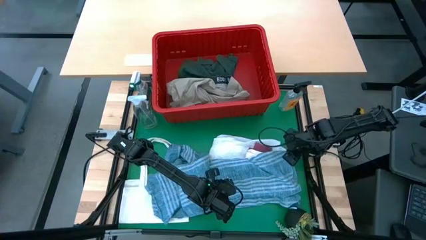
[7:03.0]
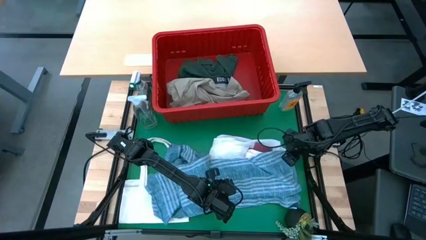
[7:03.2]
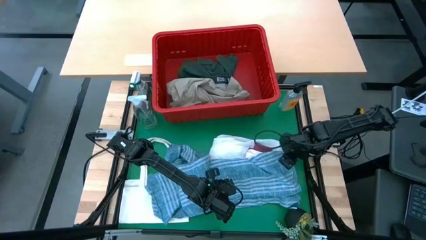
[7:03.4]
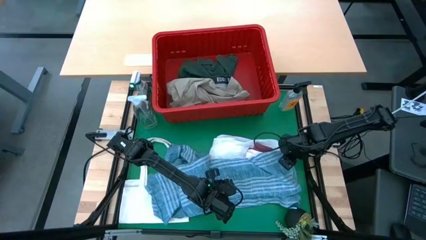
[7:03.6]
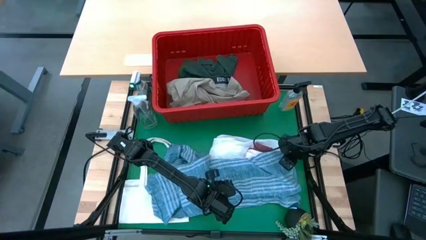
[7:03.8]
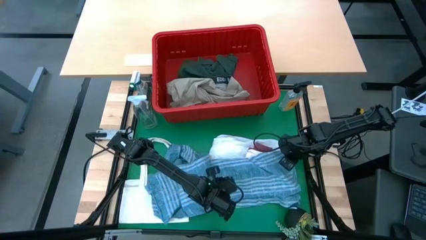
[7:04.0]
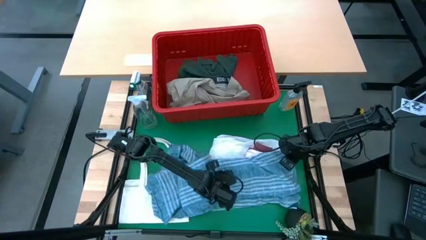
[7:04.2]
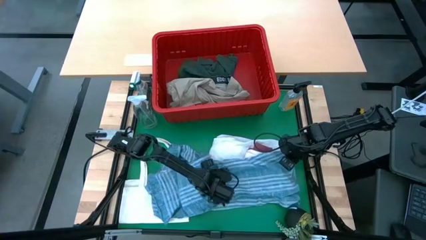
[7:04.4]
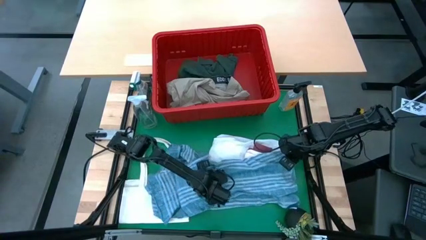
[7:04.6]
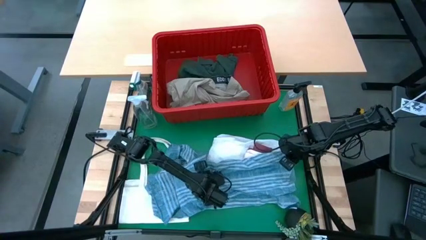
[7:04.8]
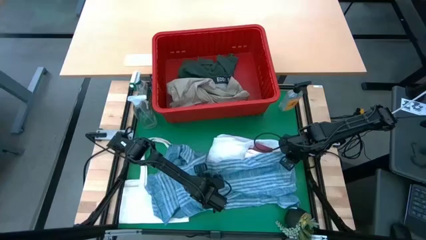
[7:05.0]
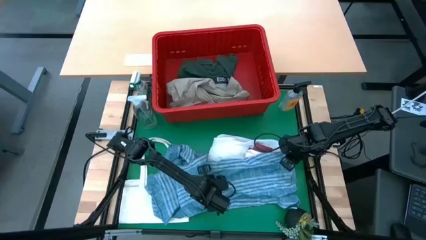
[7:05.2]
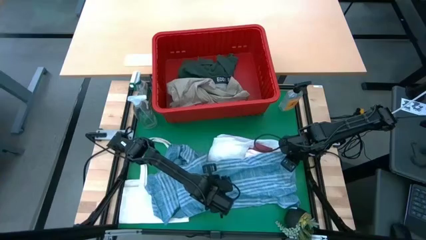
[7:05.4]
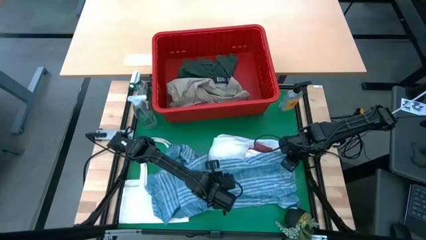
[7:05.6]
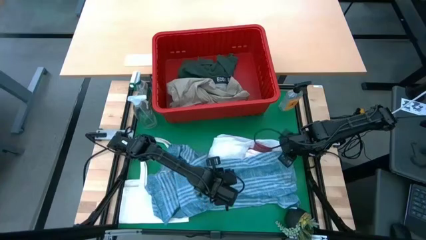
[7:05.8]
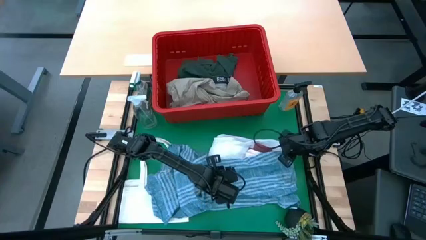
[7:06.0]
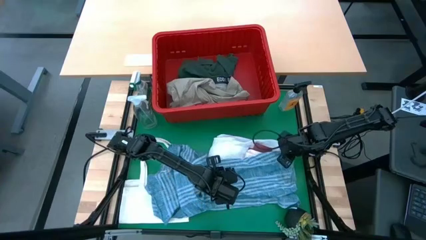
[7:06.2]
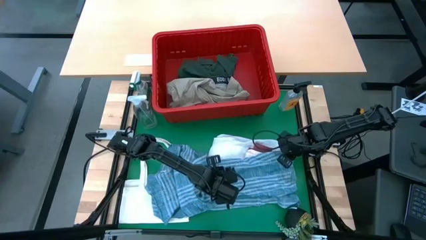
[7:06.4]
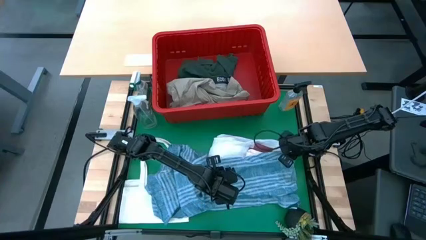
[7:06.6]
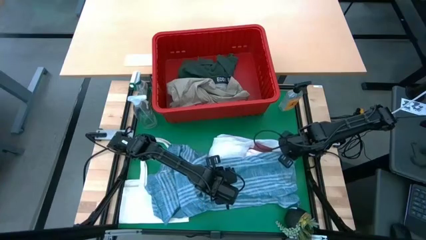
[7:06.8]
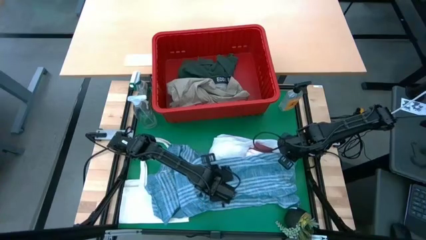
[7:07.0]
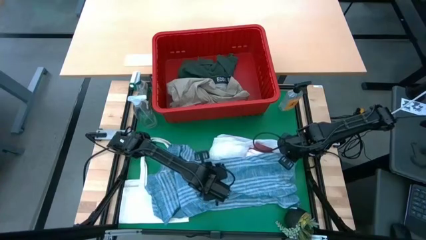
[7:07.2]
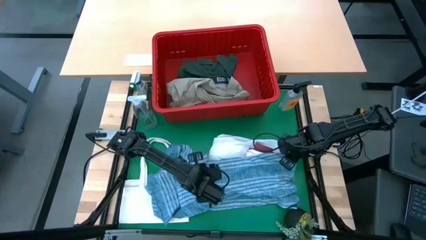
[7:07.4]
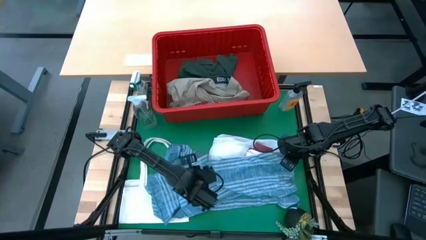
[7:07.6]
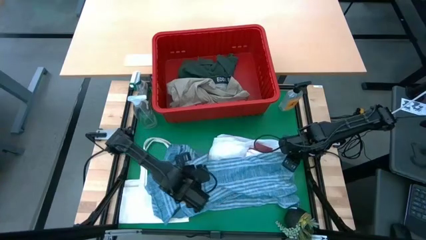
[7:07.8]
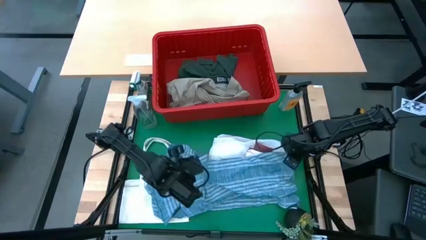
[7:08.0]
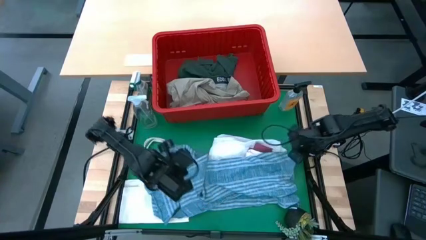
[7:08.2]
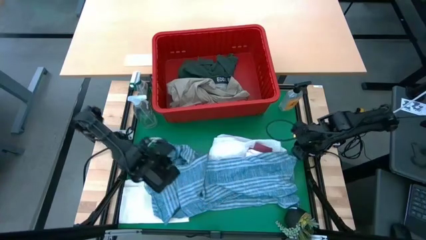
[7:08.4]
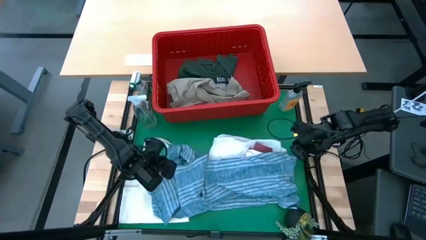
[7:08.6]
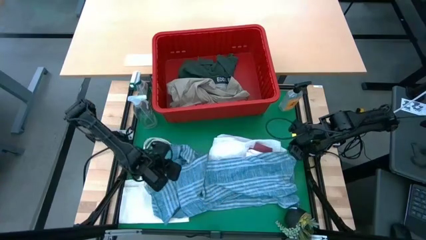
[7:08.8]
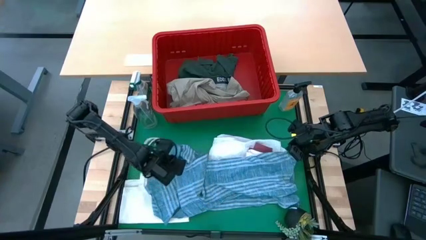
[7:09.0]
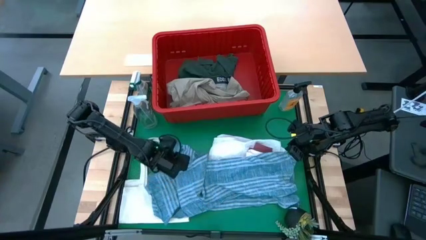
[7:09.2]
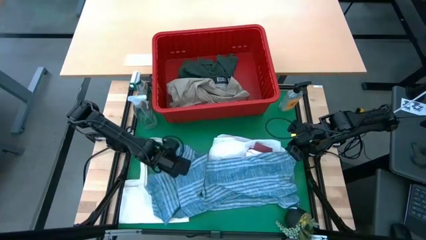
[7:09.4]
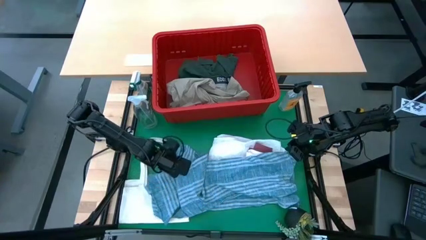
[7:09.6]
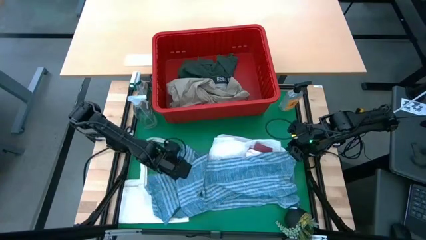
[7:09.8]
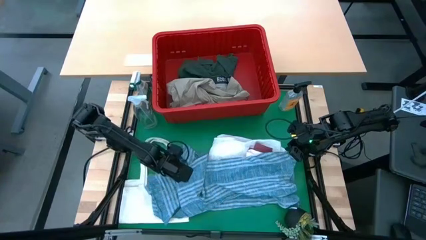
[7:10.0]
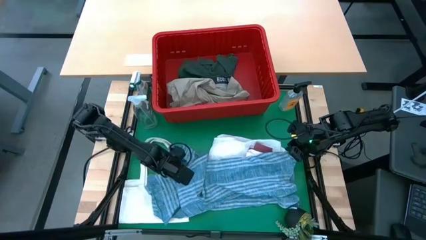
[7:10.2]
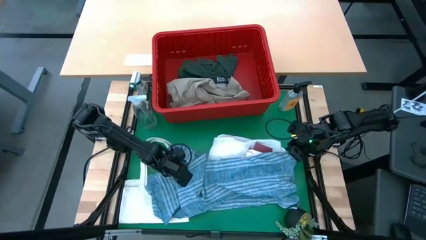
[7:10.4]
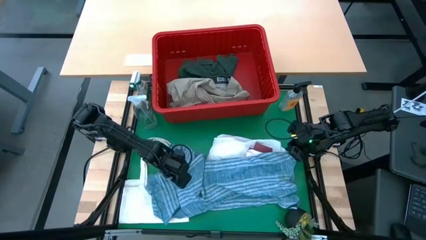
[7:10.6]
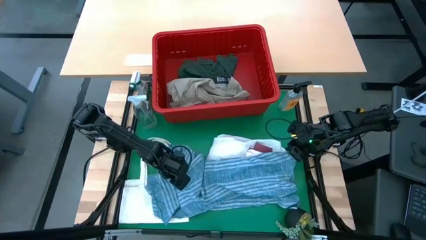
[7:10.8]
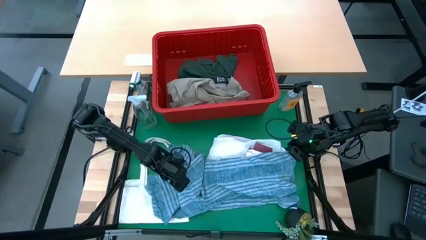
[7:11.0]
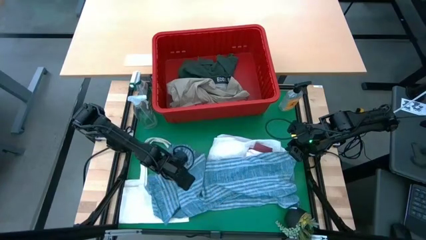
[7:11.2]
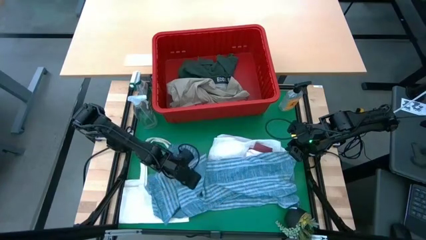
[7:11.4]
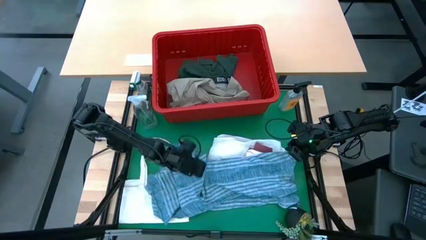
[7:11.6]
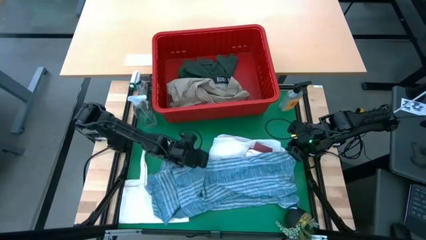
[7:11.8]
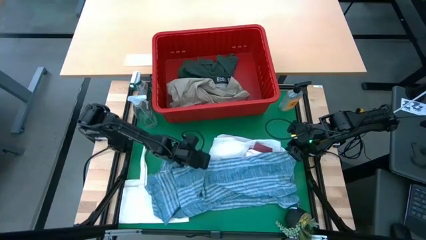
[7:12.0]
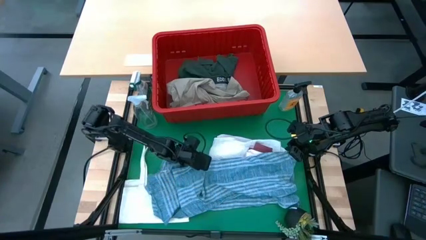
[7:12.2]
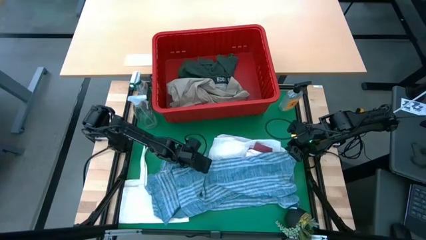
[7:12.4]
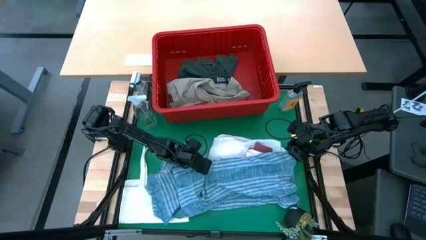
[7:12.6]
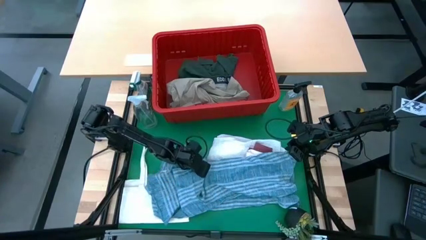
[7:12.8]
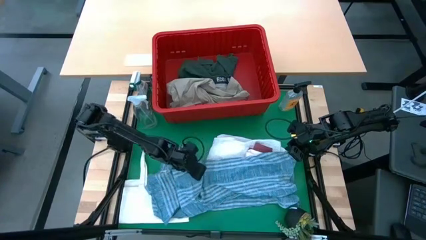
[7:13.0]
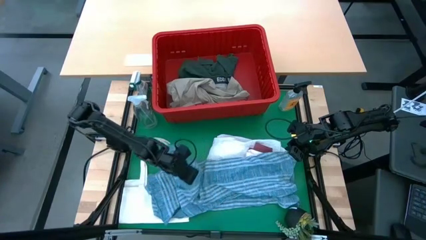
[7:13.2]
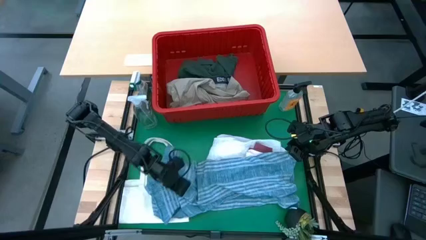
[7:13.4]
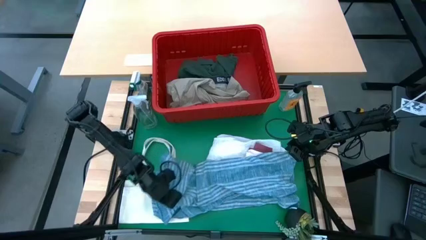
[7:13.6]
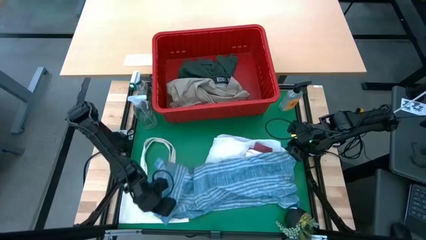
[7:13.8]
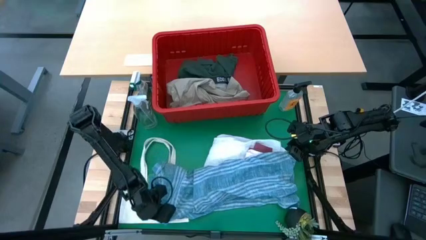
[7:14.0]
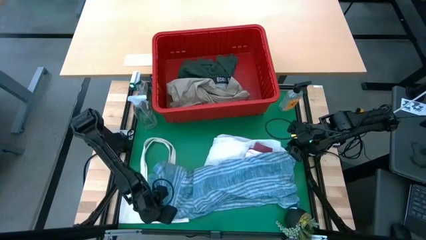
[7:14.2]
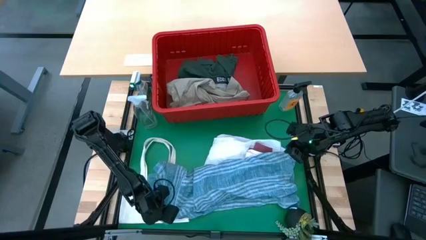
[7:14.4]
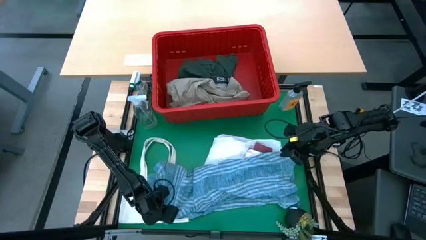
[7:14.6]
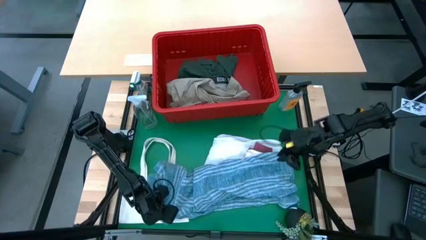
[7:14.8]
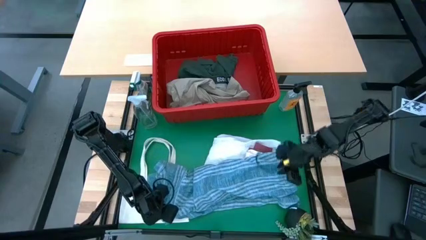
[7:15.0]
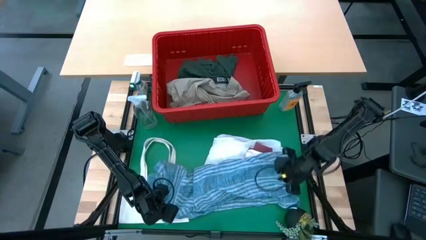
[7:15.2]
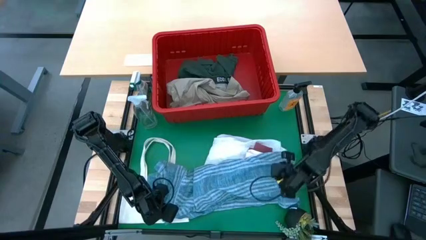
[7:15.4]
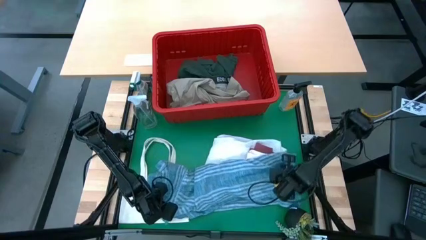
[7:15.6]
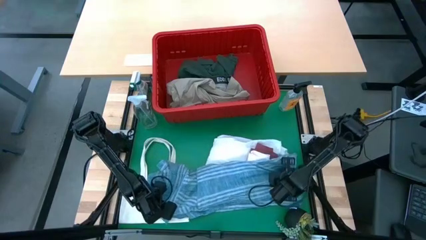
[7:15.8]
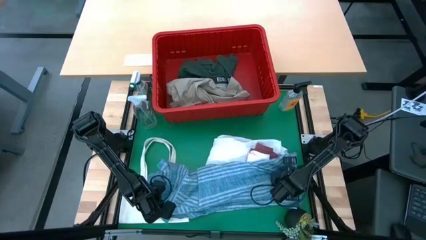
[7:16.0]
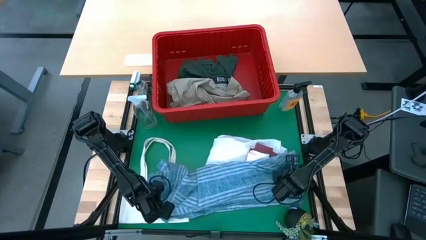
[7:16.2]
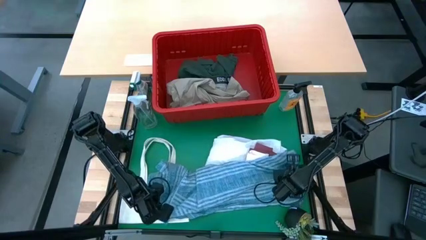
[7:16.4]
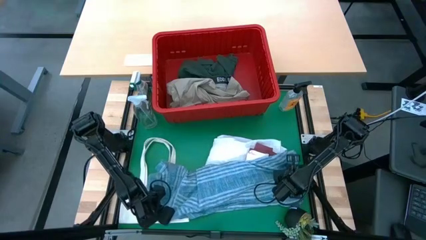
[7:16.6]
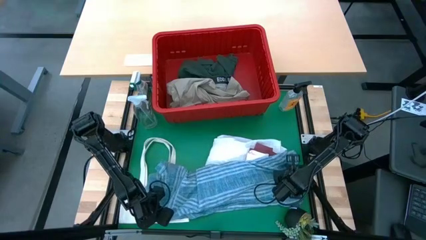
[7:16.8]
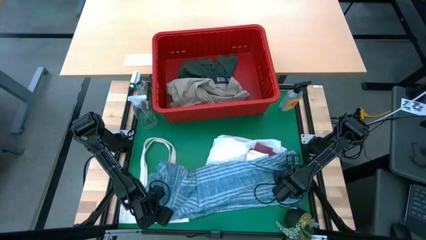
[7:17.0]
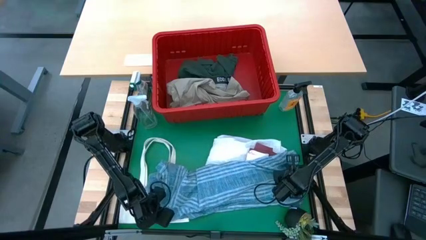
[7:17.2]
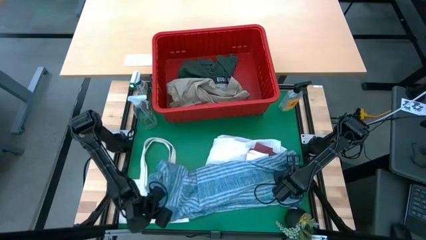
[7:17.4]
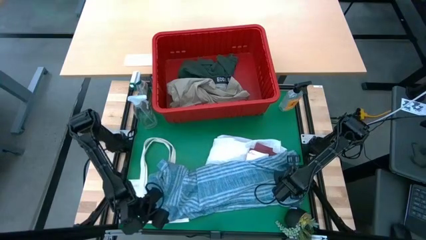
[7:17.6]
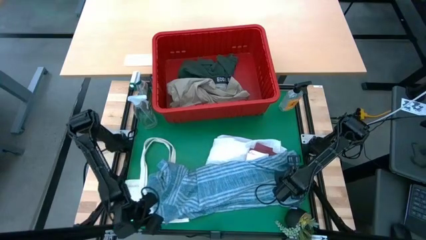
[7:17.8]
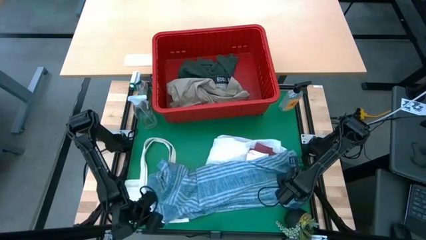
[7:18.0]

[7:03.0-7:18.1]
Task: Fold Laundry from Bin
Fold the blue checkered polo shirt
